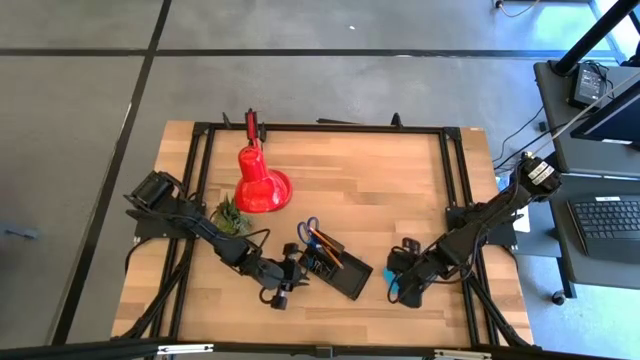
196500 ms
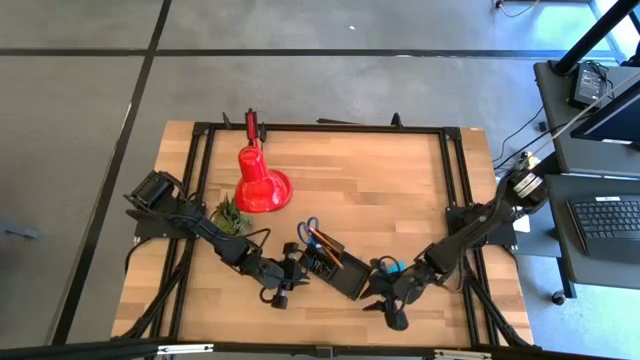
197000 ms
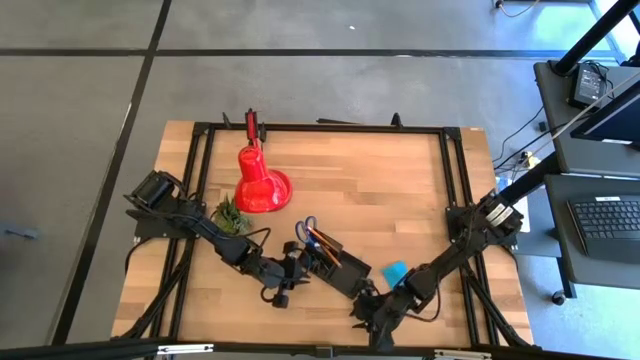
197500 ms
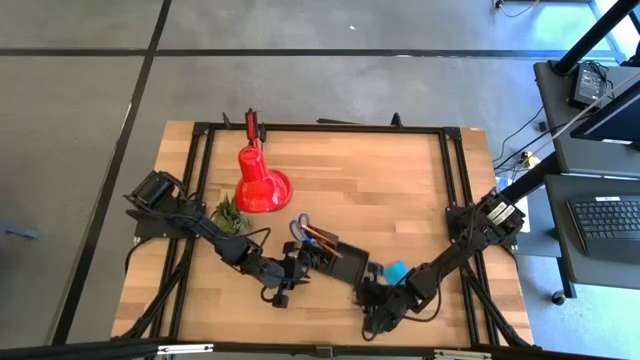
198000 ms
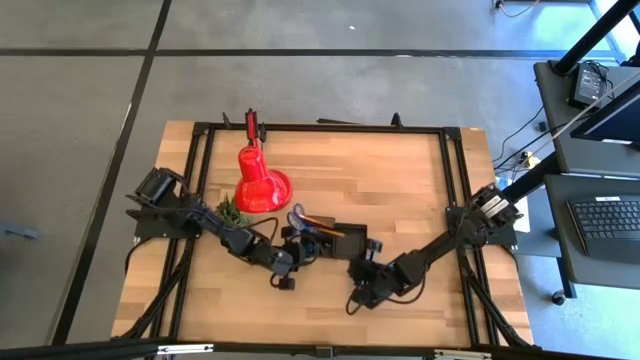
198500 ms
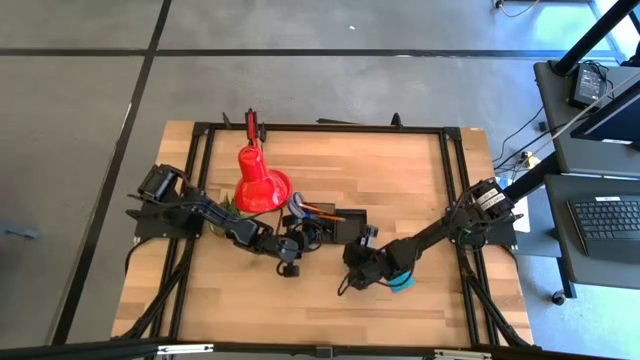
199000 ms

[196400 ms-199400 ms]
Task: Pick and place office supplies into organizer
Adjust the desk organizer on the table

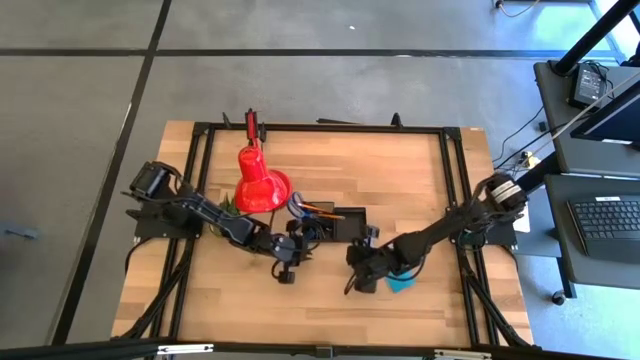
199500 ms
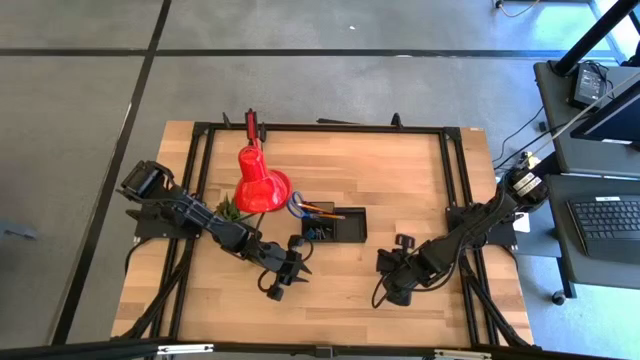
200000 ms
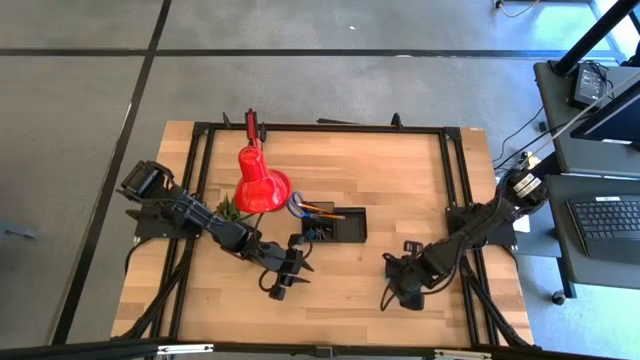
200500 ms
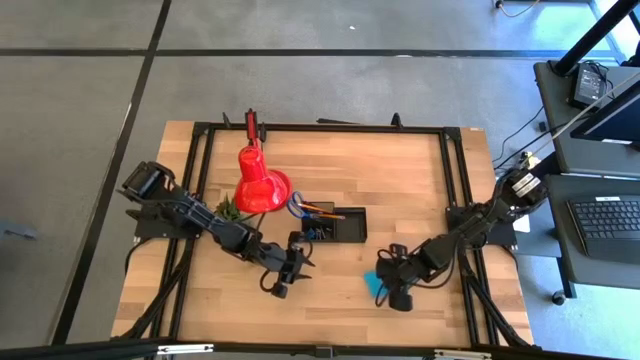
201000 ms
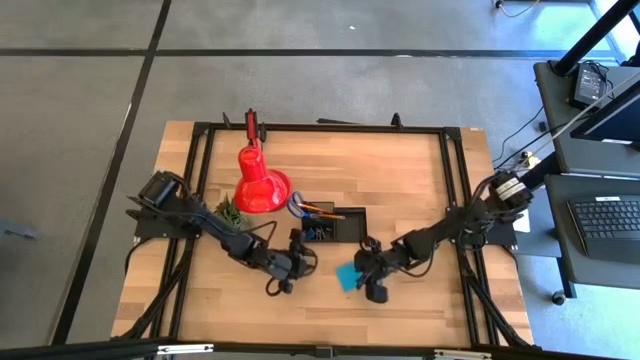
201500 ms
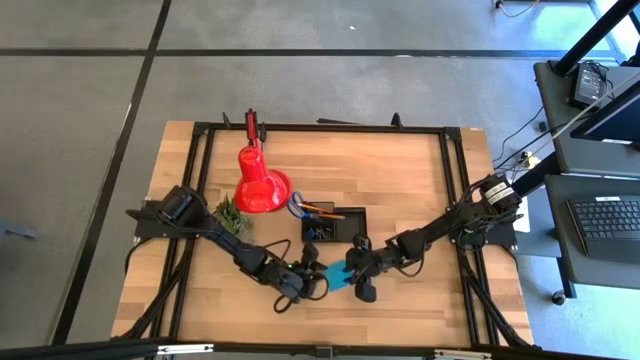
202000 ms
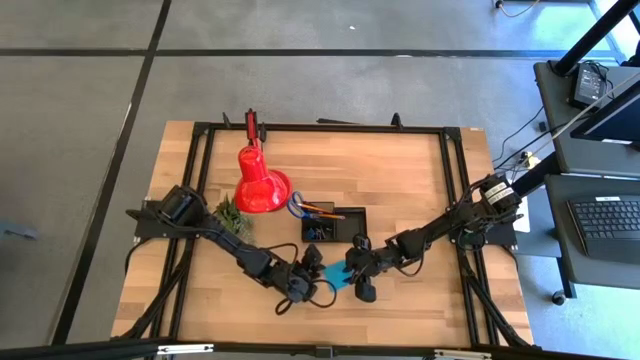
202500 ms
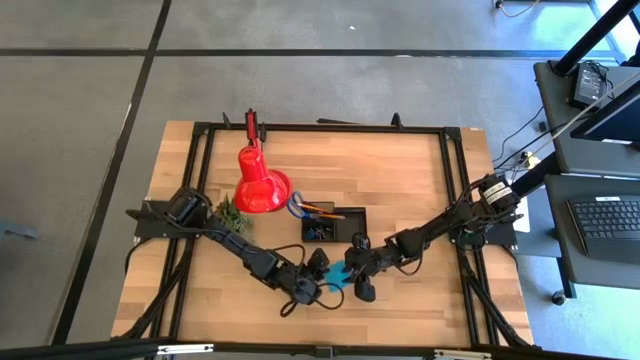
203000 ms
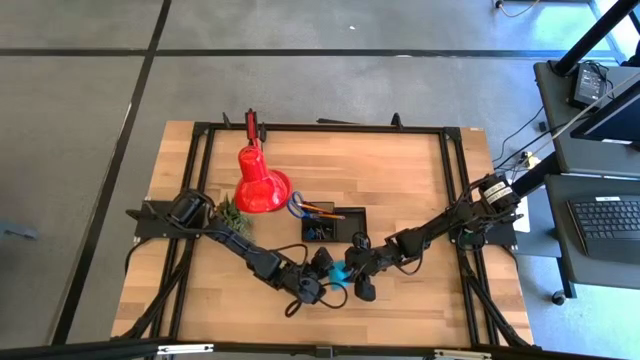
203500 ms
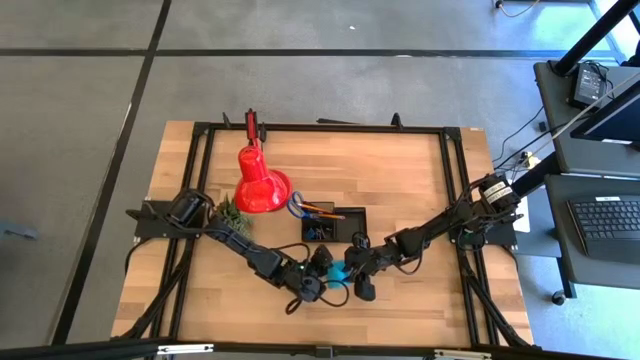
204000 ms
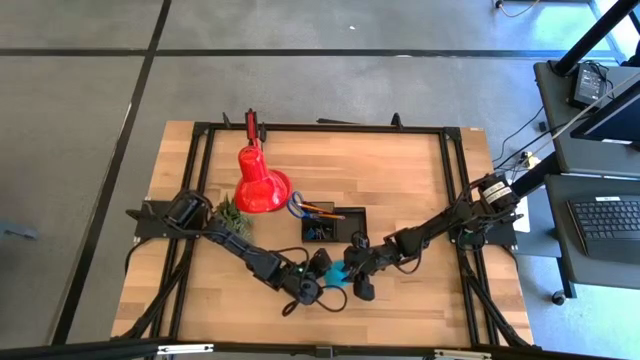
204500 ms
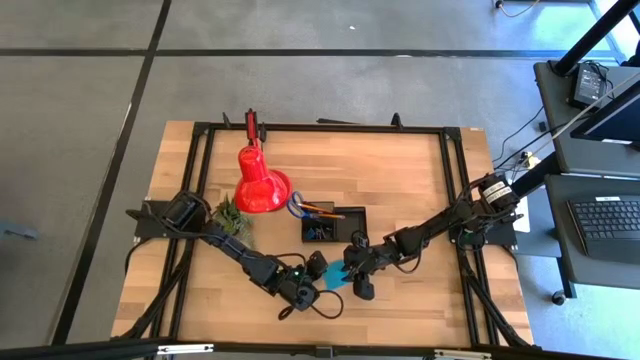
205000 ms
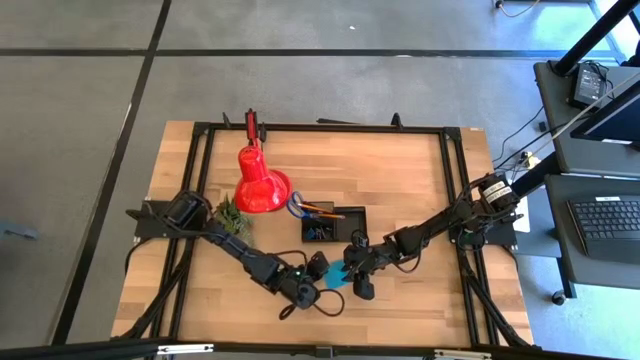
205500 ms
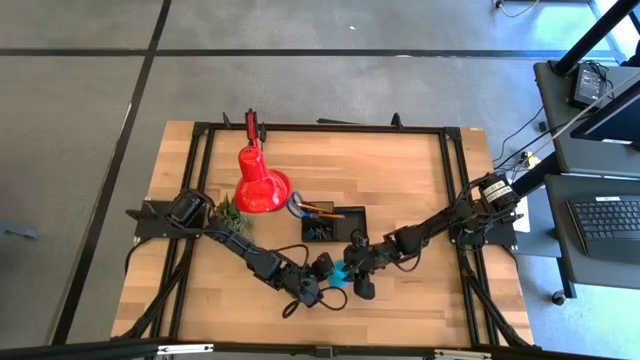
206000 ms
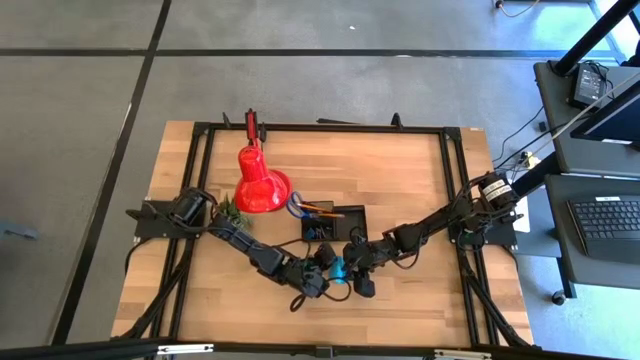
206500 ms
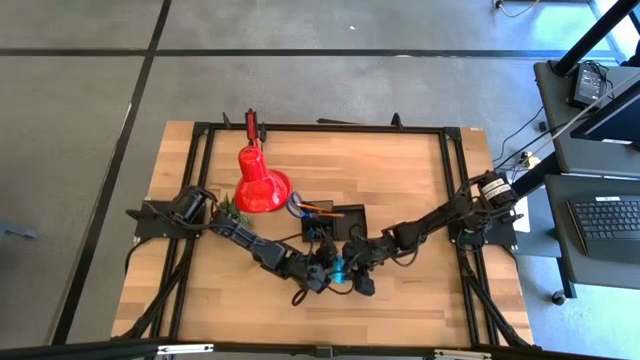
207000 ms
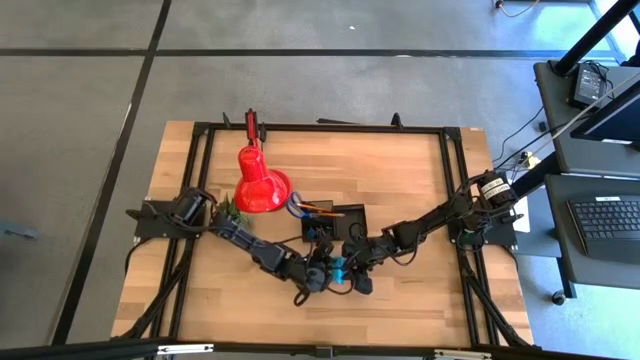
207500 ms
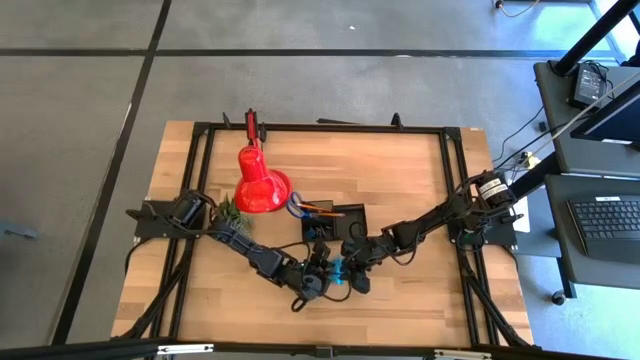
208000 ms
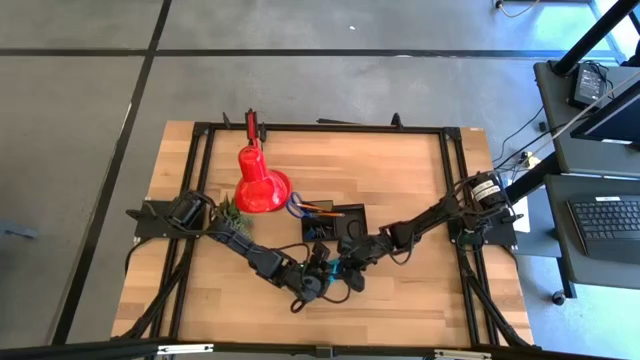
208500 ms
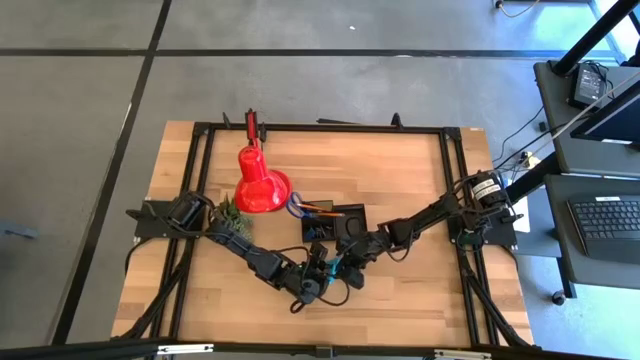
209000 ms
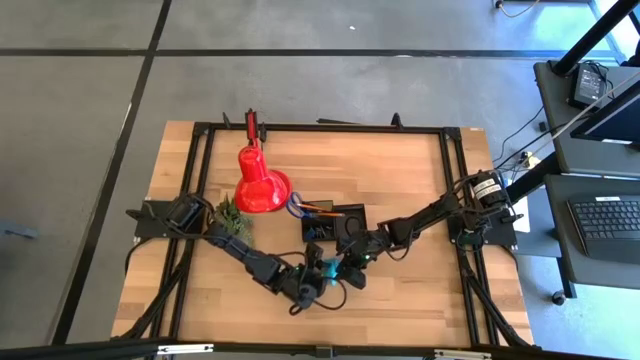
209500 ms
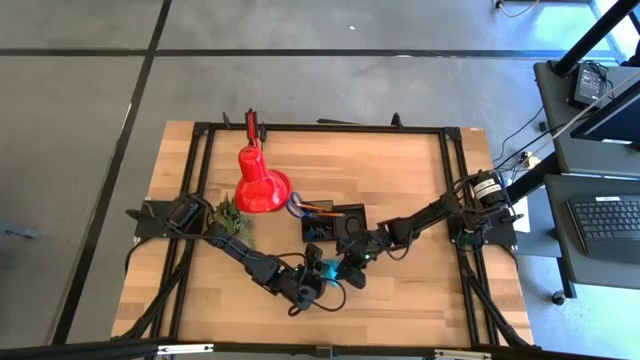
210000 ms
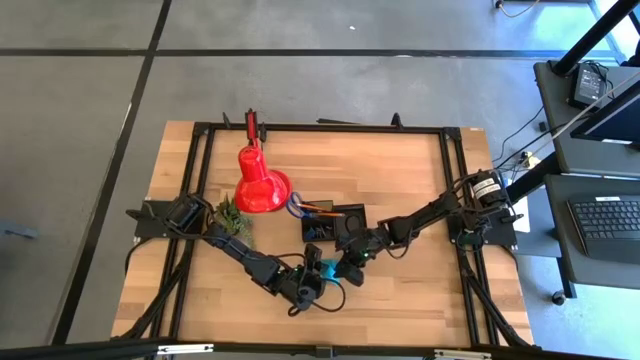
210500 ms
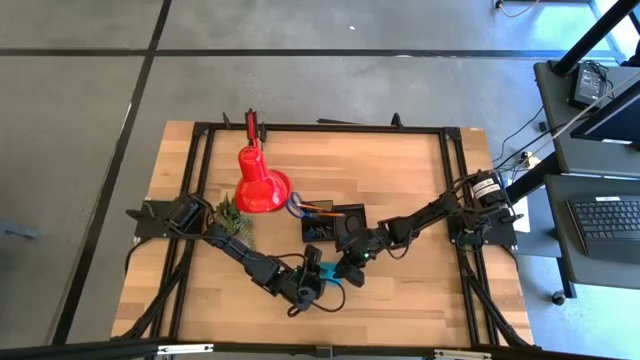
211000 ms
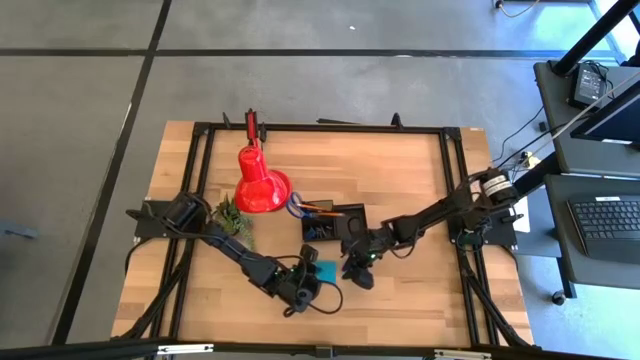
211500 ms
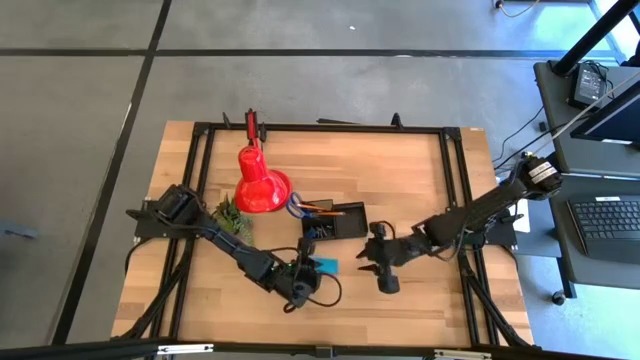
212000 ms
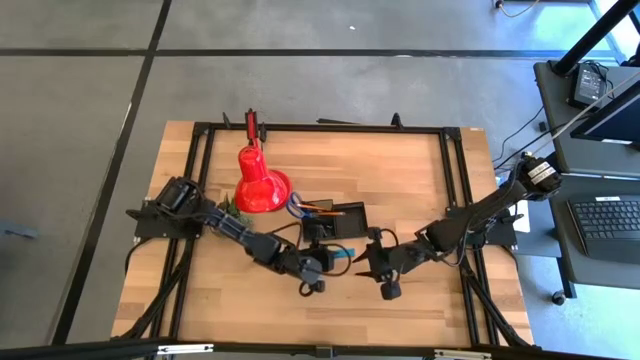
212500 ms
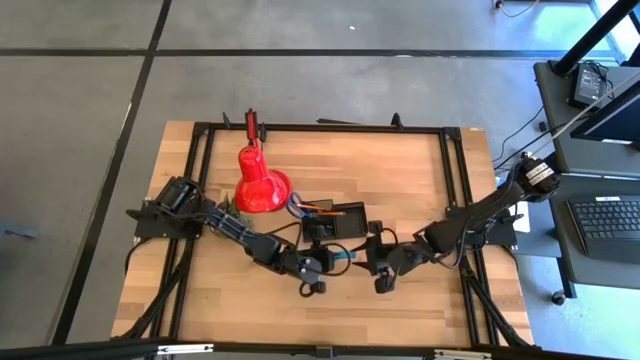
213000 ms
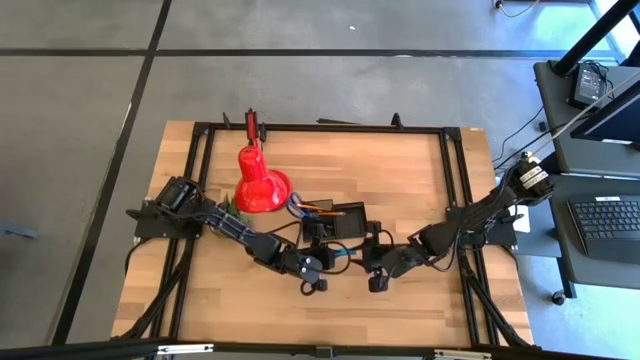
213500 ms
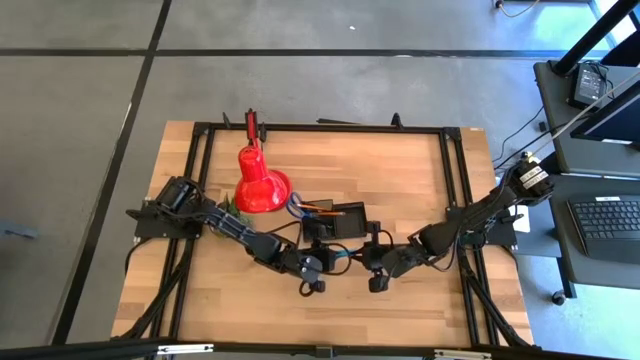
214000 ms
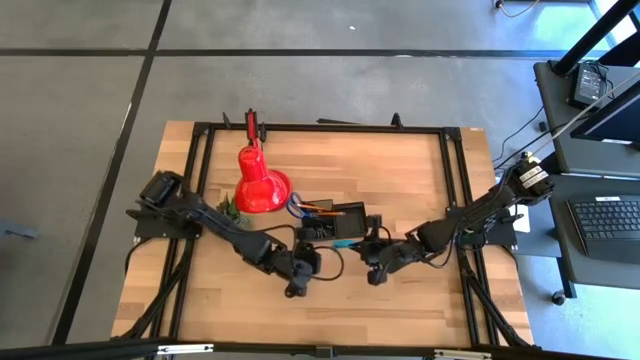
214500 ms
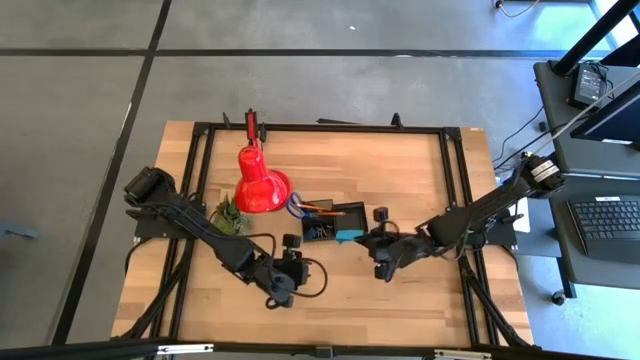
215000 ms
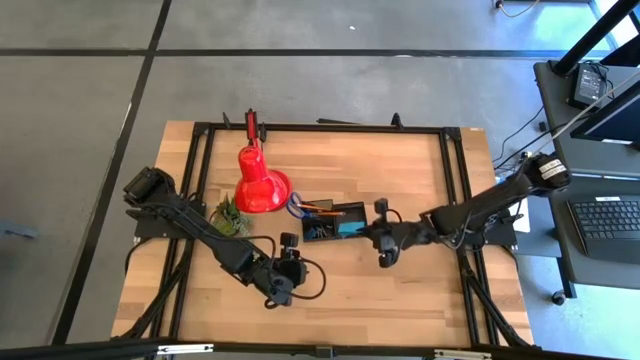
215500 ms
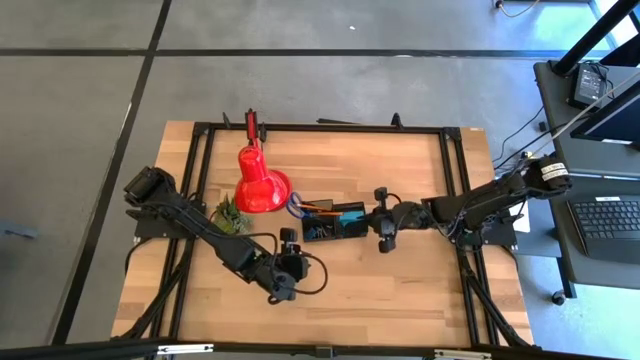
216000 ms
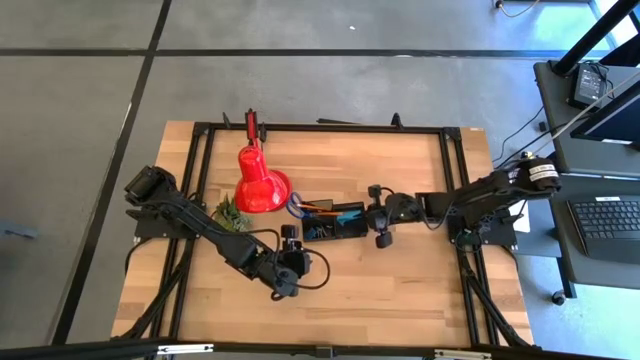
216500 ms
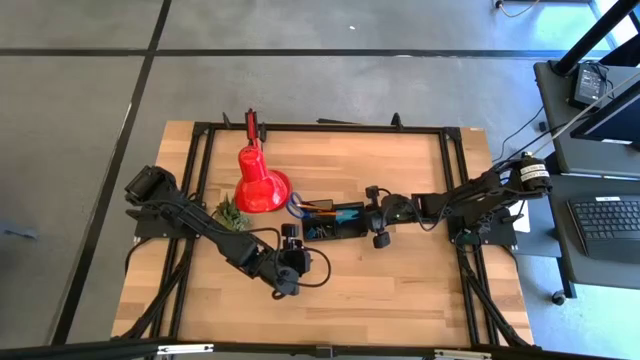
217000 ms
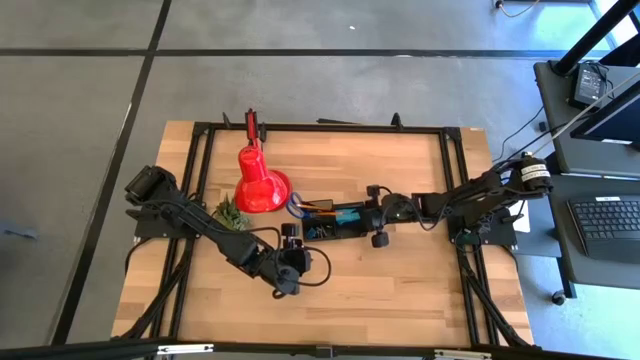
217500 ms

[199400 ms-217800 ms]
Put the blue sticky note into the desk organizer
